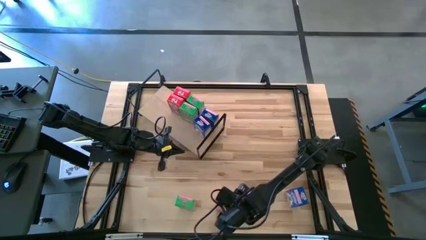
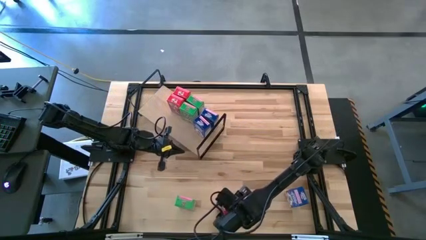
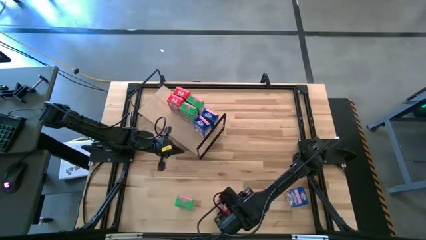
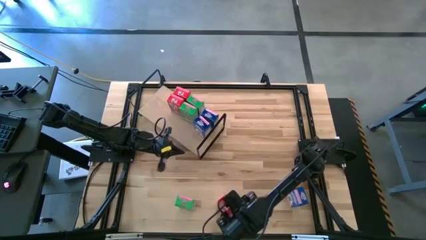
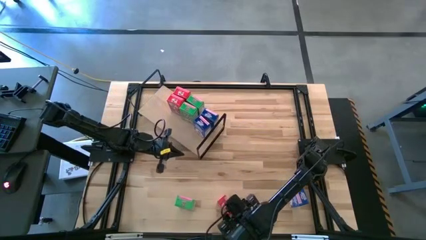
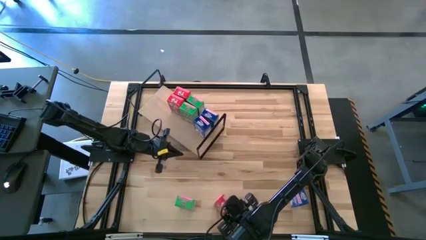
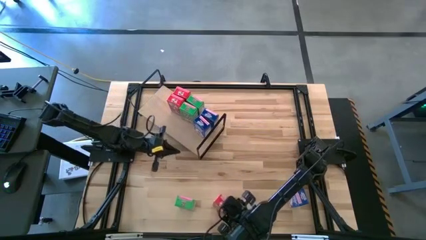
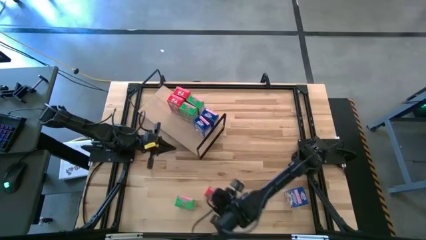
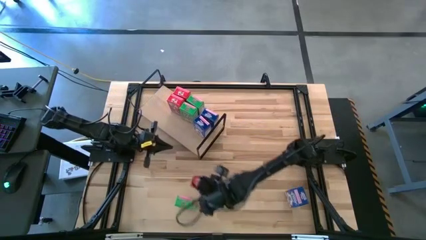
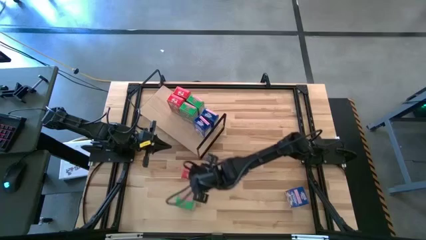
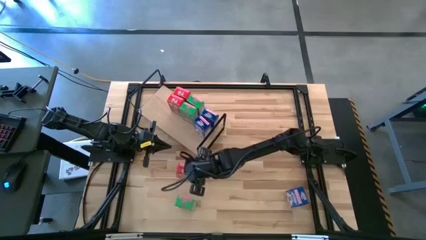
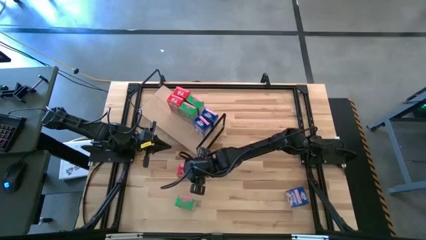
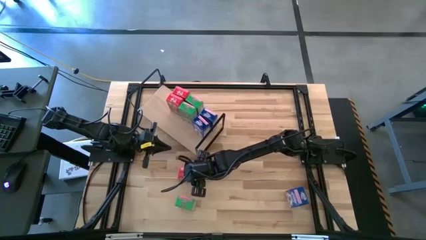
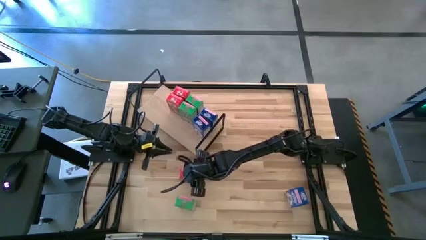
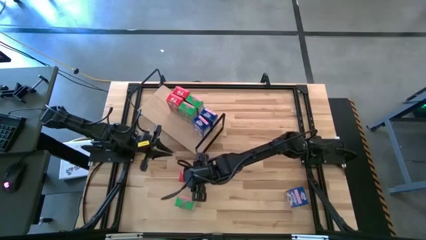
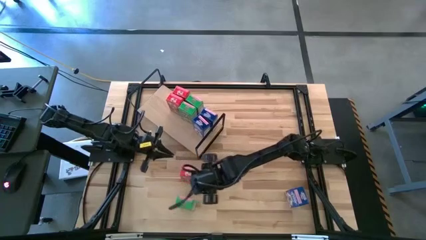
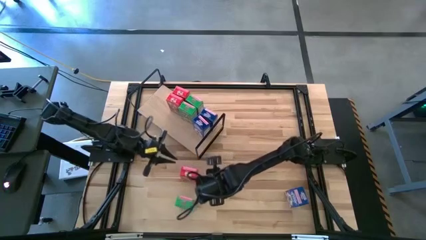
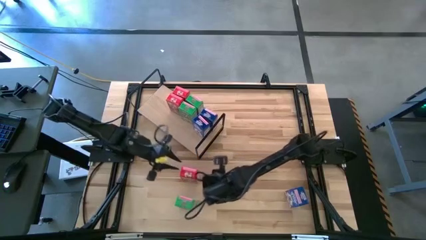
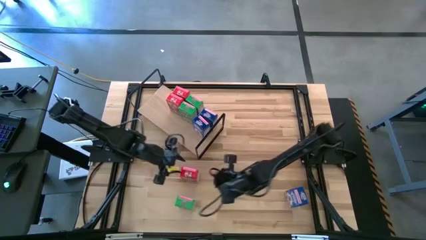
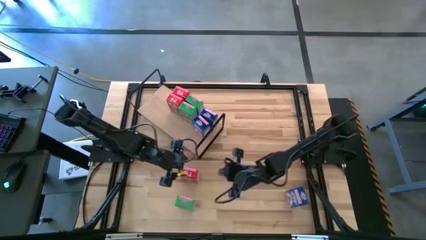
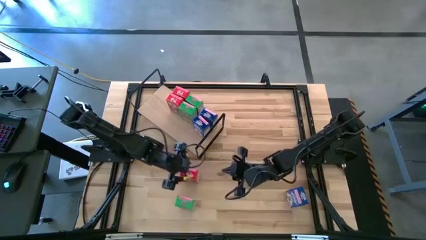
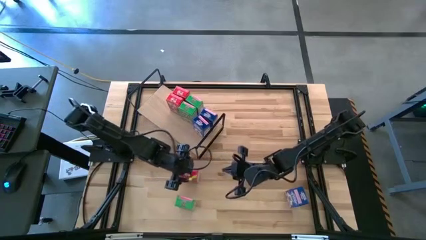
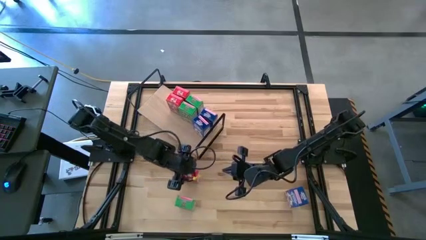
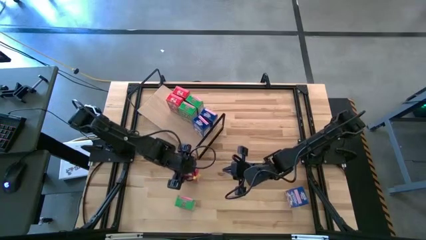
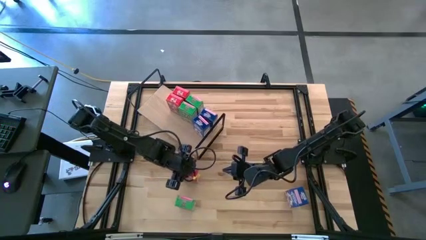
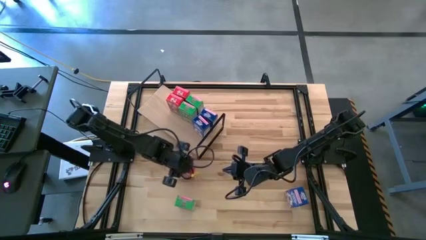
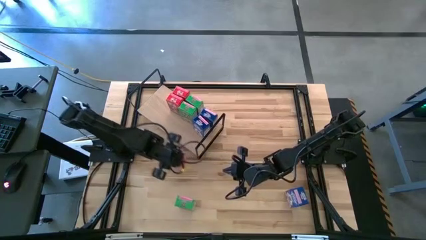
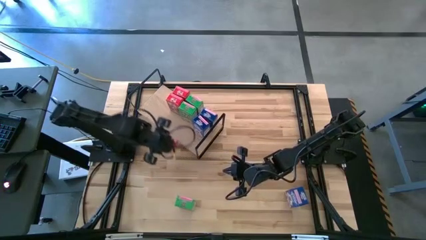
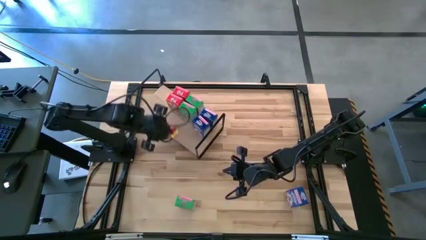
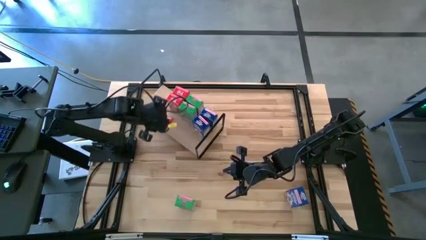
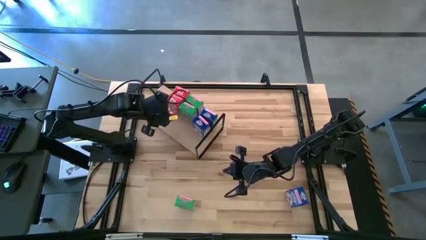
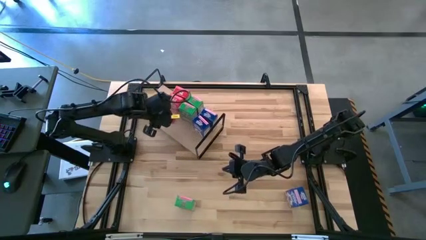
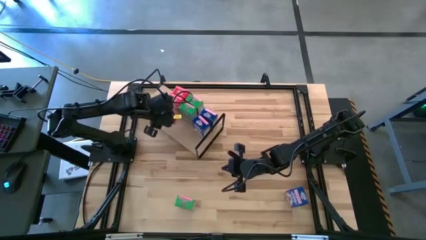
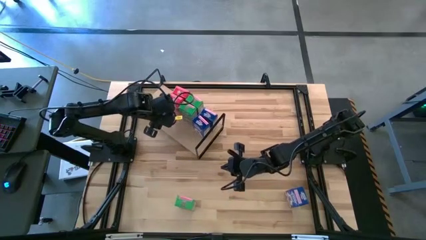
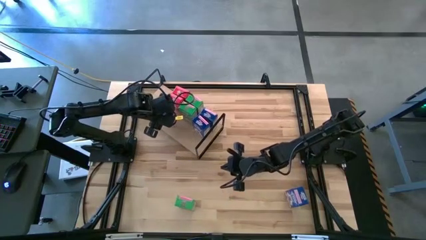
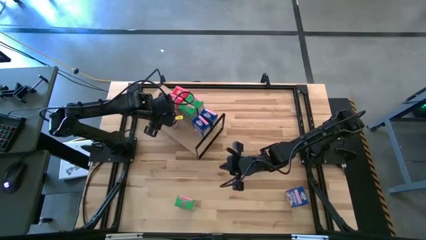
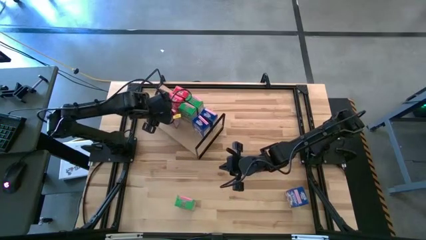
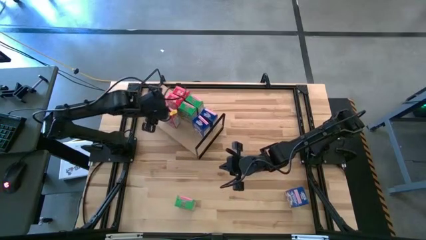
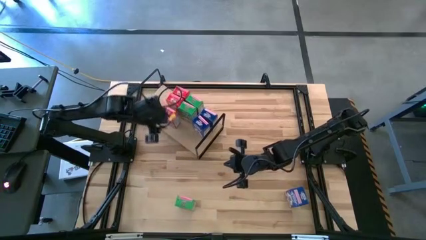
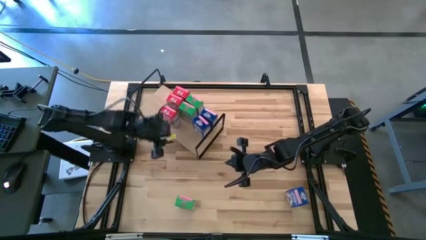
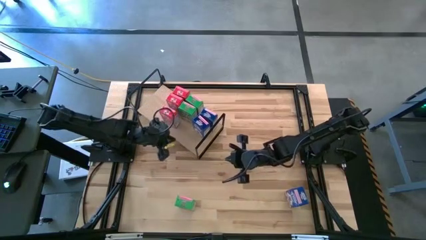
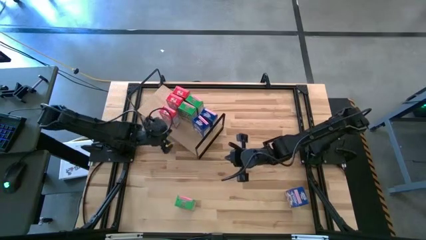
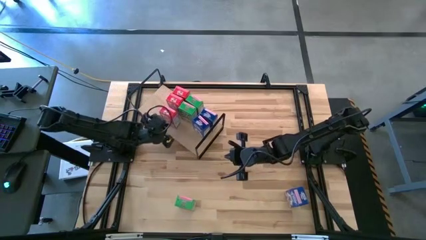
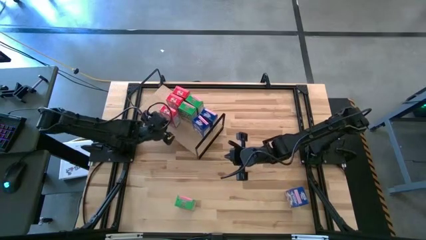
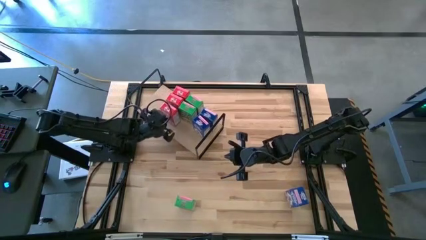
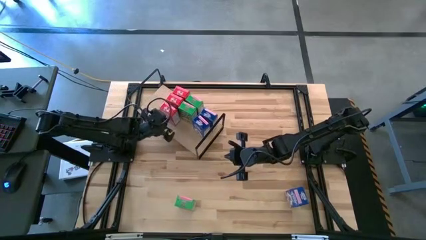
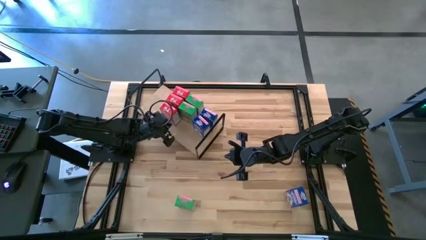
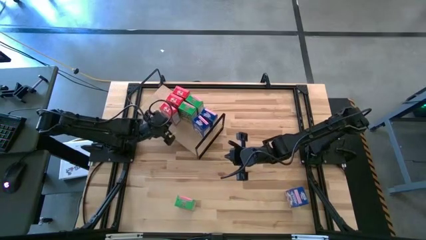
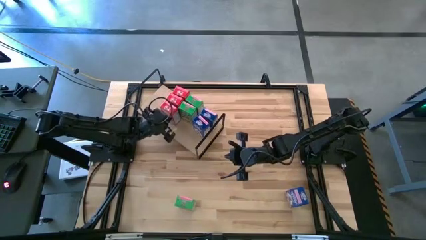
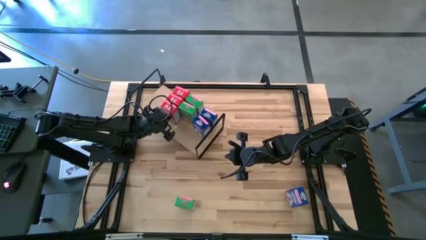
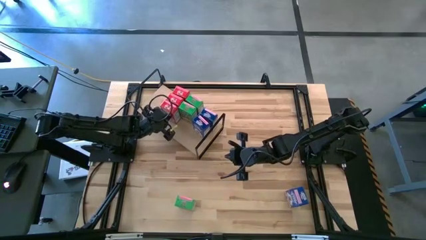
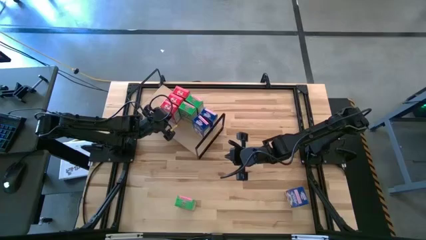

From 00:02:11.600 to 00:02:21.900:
Task: Stack cereal on shelf
Put the red cereal on the shelf

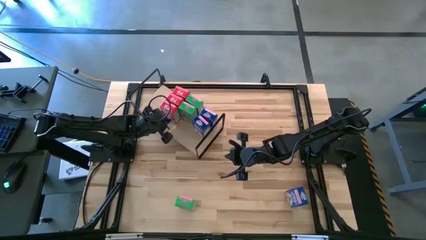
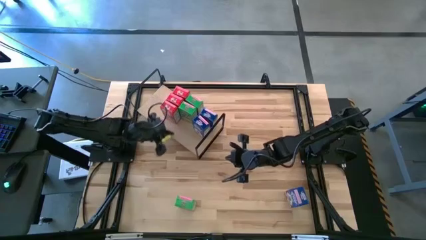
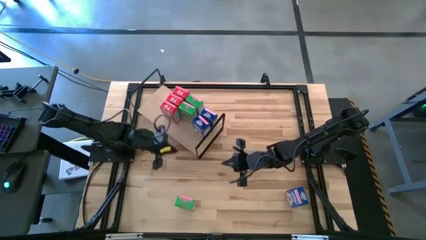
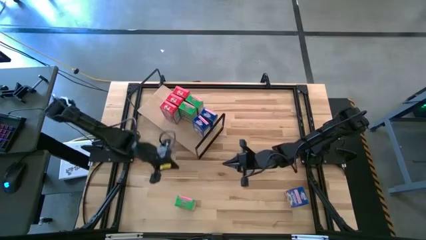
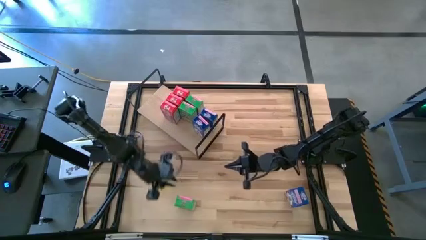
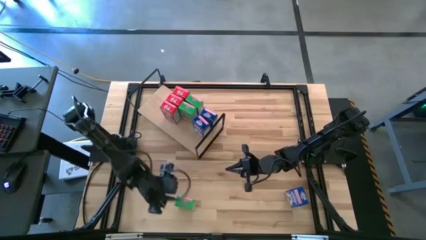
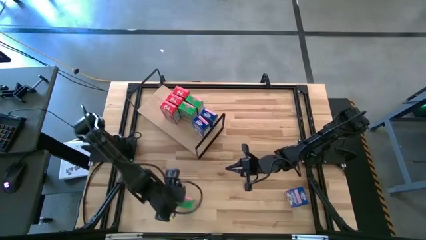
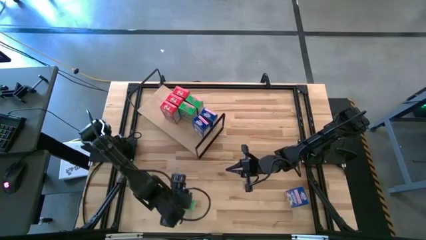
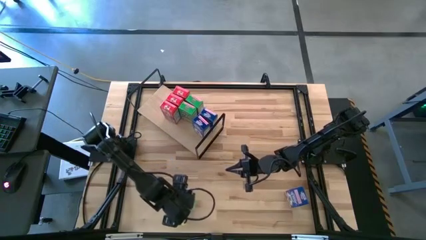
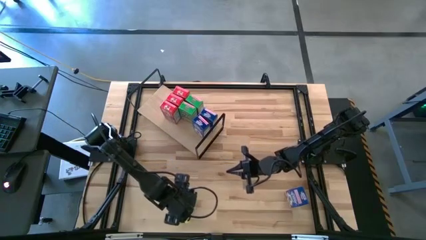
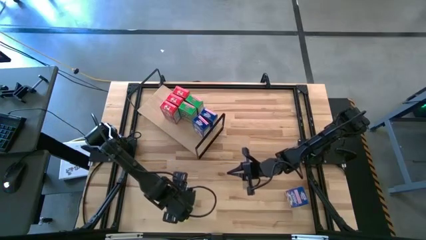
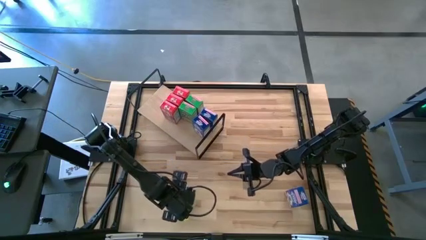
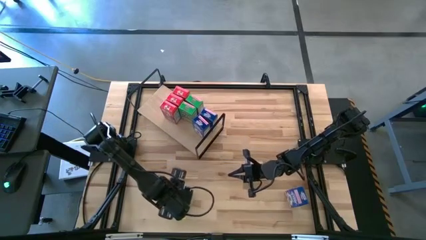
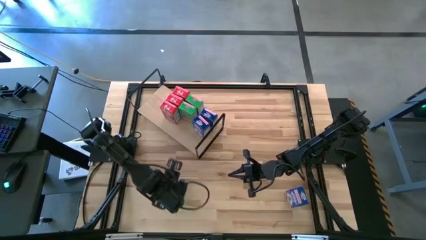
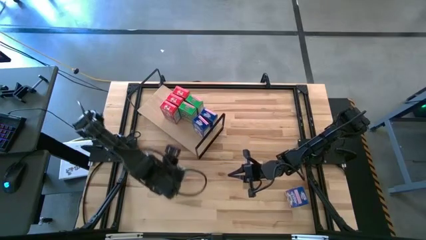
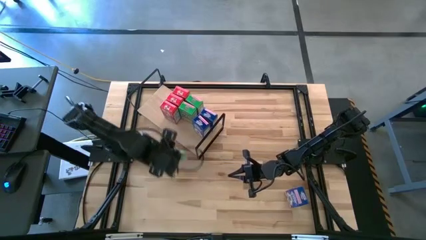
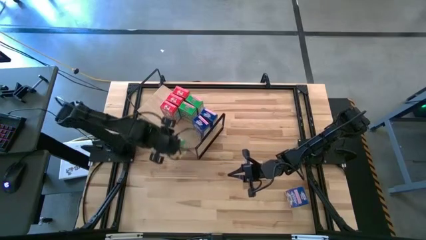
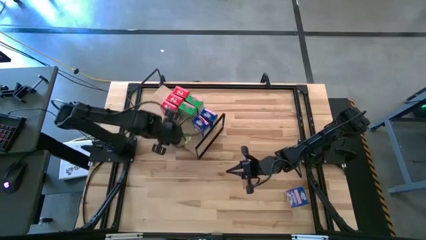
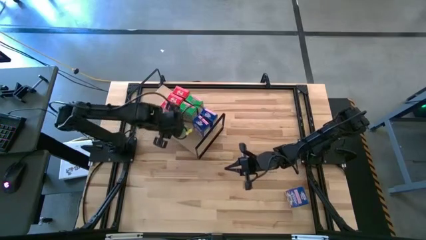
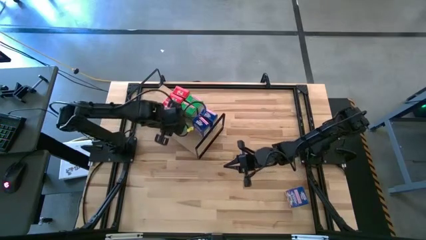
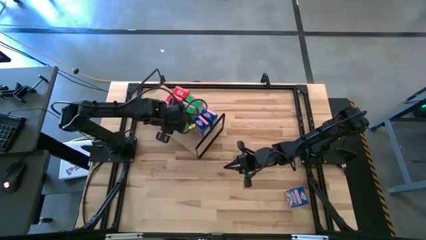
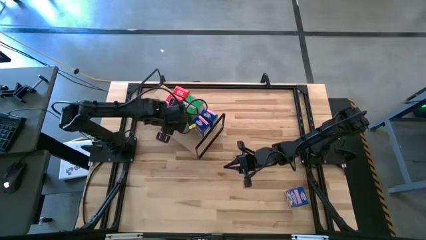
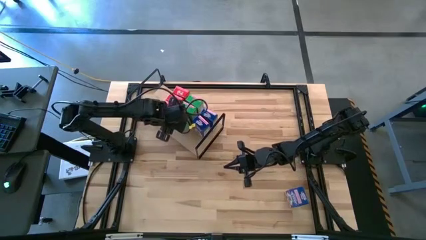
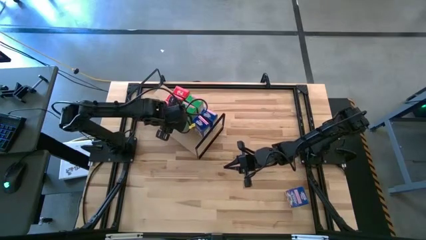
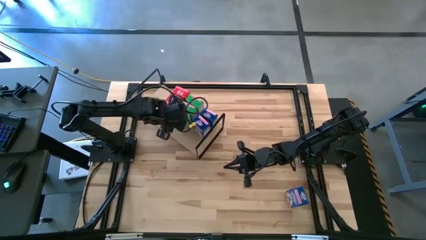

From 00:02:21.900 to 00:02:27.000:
Put the green cereal from the left on the shelf
